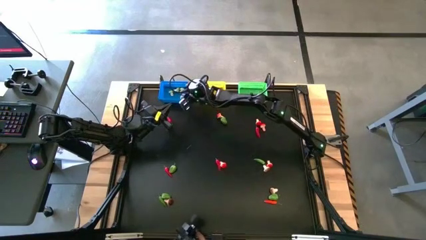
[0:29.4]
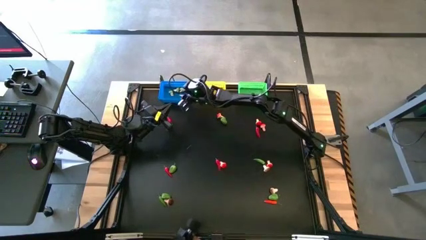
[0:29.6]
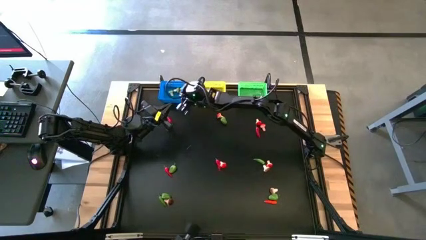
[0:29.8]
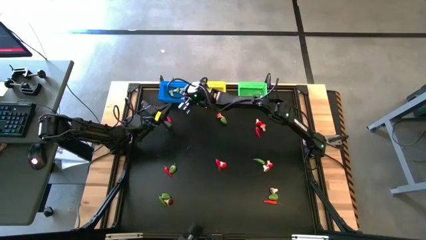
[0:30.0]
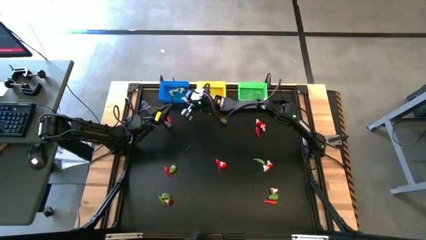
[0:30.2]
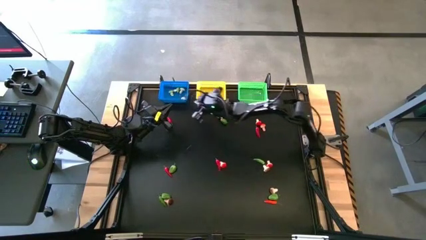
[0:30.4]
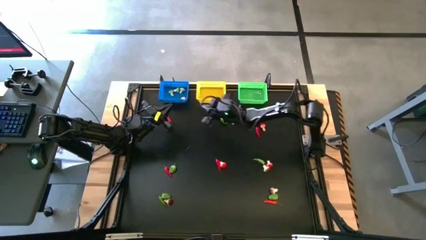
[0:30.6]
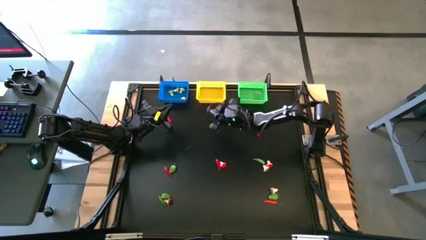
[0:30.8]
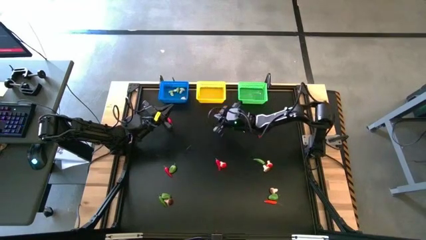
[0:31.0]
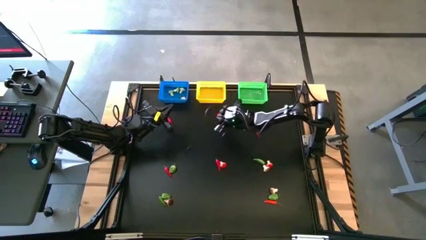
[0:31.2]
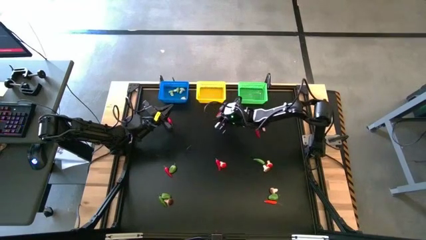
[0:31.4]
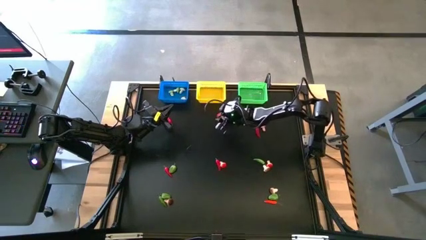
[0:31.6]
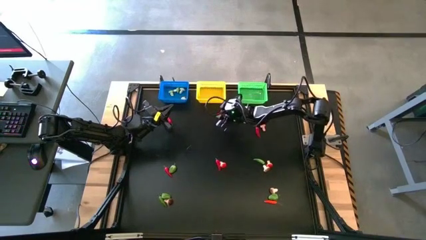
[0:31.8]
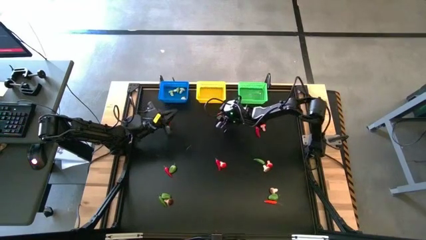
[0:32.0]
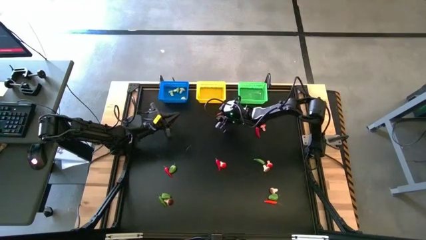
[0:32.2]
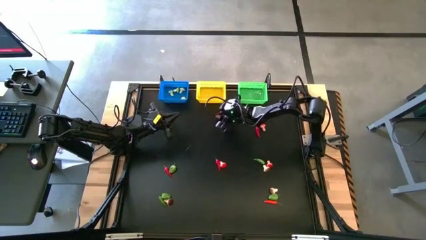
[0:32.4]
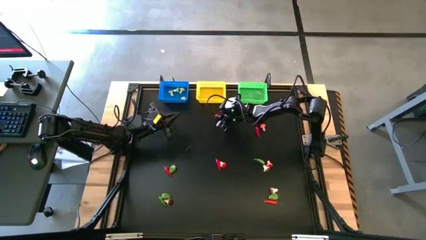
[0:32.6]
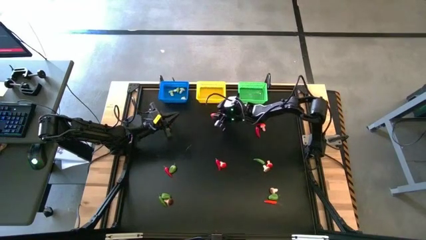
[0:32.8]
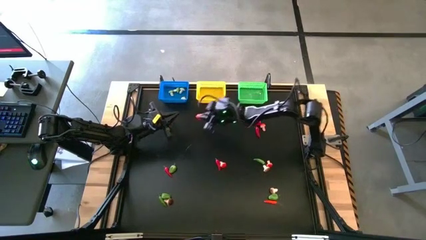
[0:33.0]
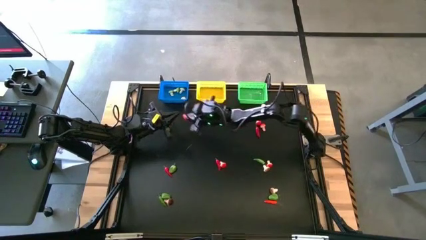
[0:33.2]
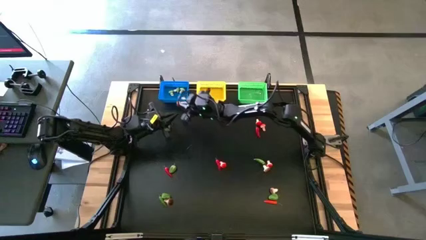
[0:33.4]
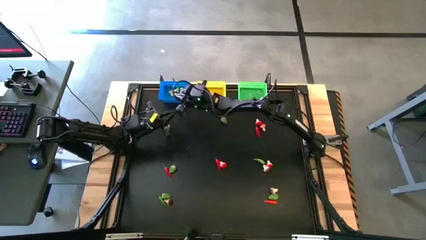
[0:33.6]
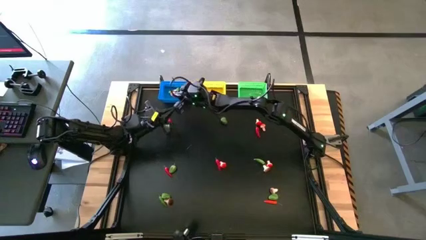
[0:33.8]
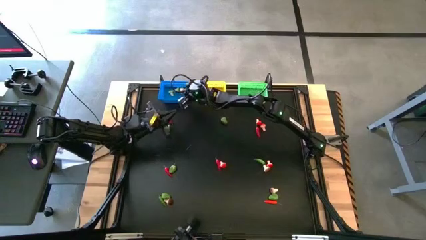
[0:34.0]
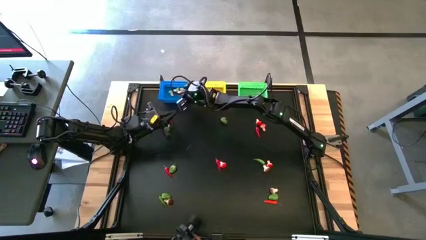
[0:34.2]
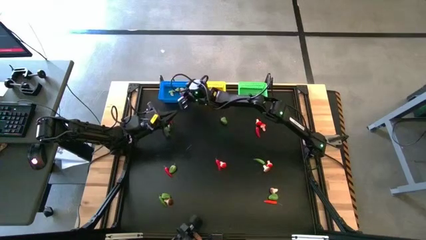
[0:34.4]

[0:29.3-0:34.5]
Task: Sort produce into baskets
Put the red mushroom into the blue bin

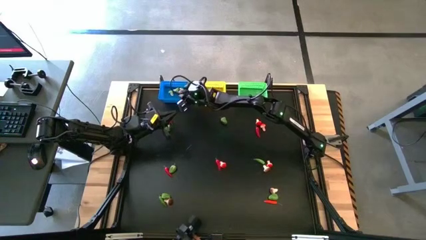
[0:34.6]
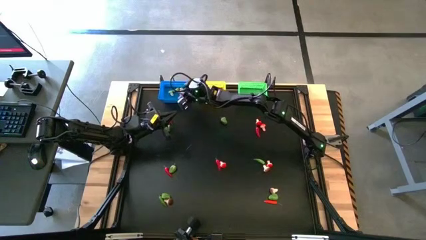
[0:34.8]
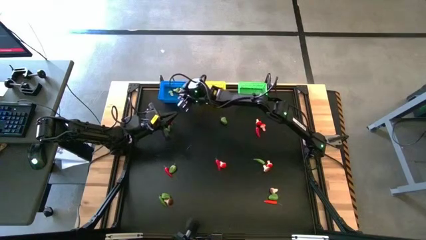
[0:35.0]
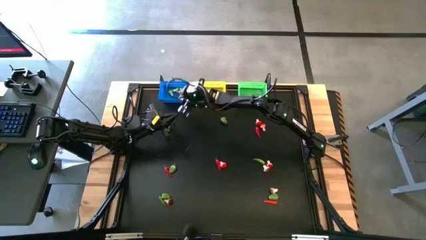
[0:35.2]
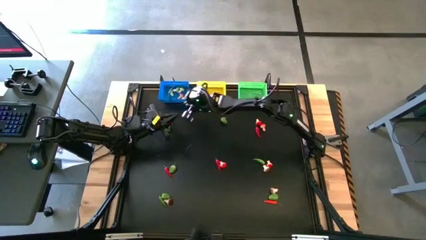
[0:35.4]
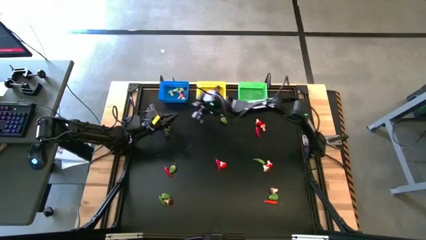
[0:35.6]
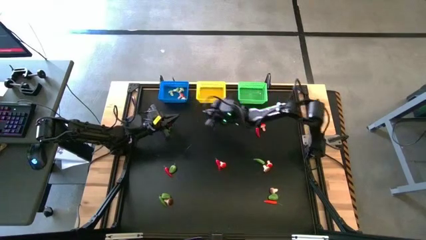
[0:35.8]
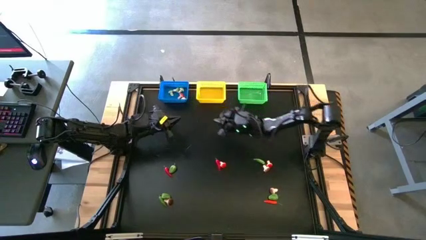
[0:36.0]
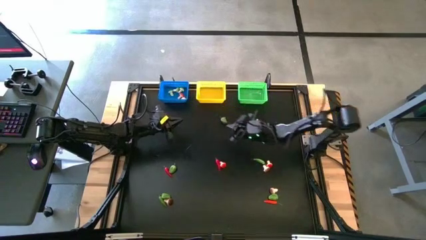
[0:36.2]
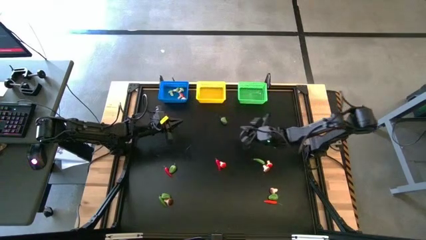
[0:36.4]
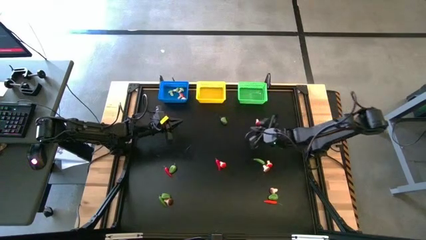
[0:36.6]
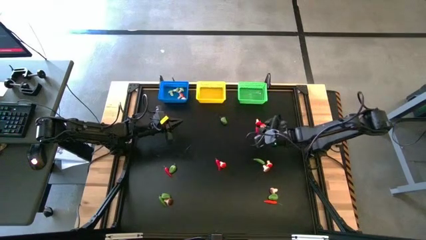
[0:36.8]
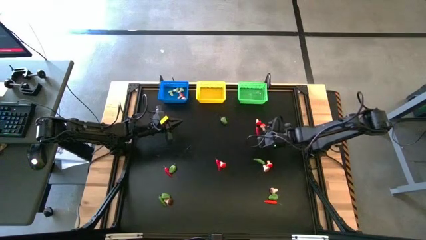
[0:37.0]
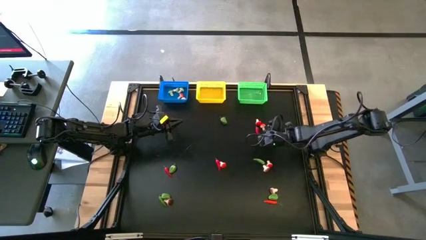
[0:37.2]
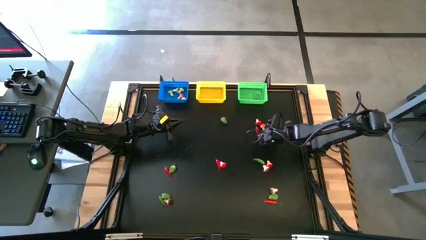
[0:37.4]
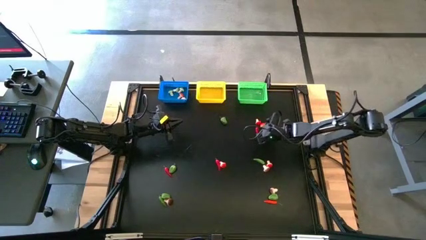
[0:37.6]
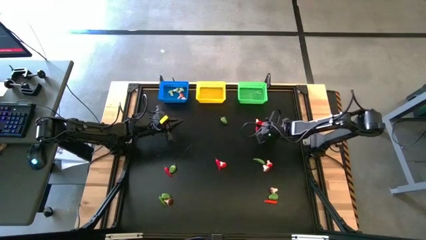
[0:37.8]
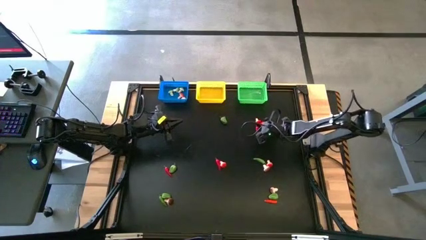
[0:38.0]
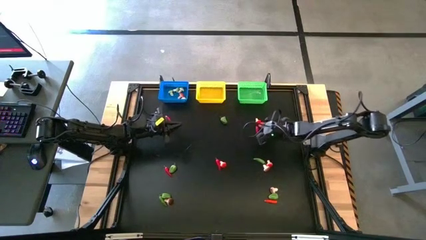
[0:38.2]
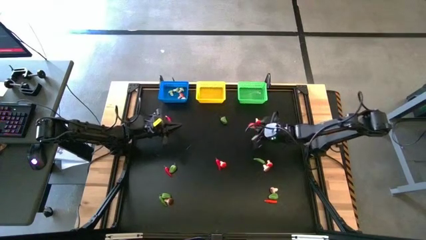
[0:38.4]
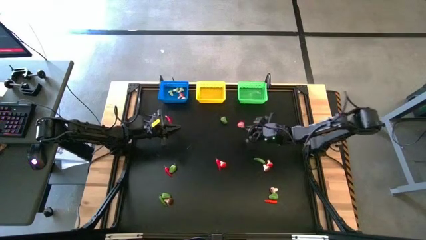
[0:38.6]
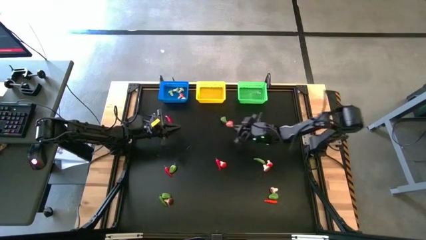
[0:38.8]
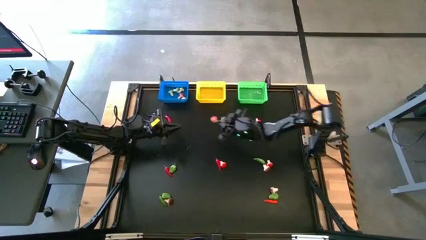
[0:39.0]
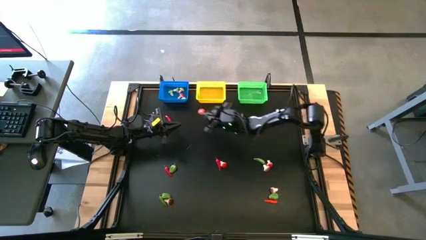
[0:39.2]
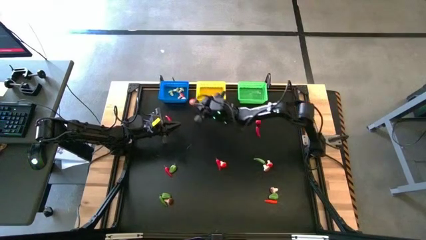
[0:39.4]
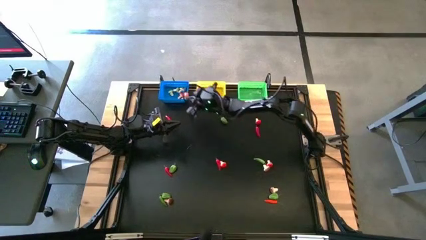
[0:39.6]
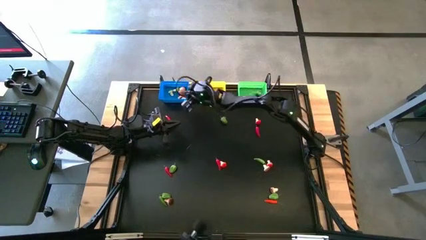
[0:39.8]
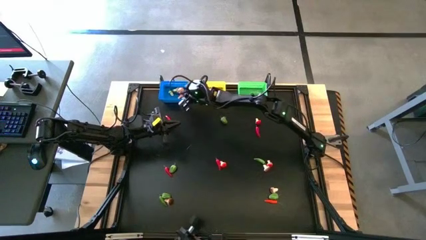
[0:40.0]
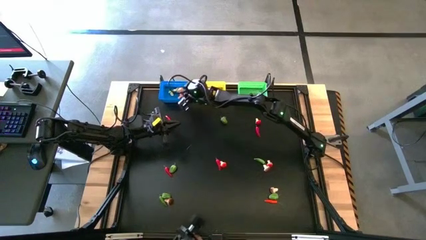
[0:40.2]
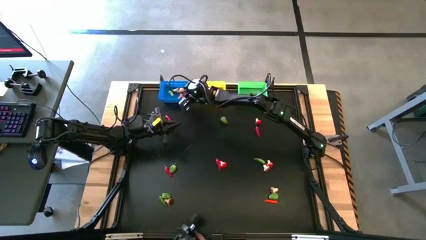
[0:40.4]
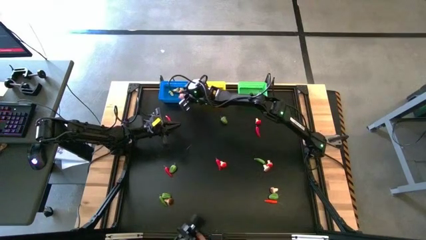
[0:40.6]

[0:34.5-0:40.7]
Put the red mushroom into the blue bin

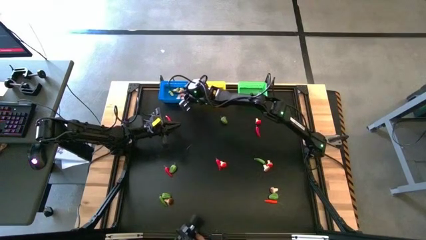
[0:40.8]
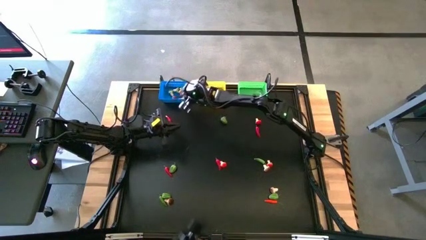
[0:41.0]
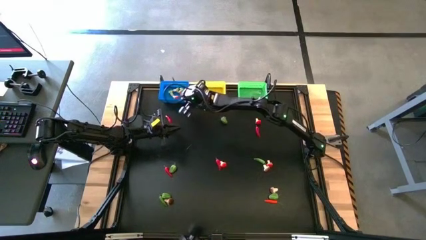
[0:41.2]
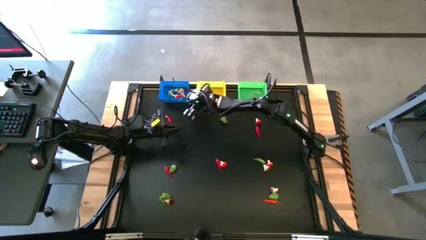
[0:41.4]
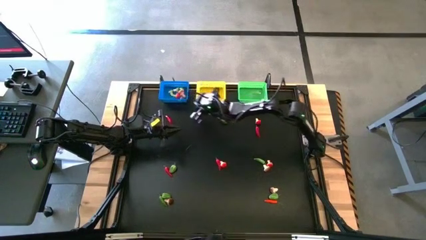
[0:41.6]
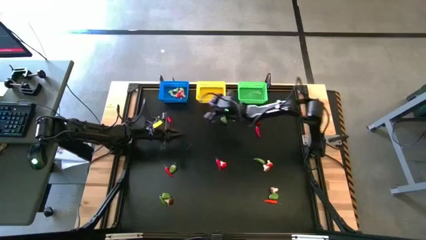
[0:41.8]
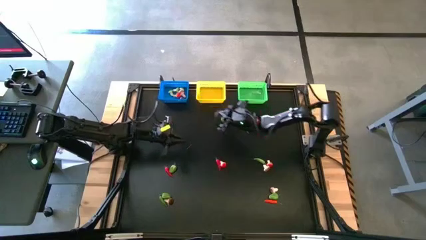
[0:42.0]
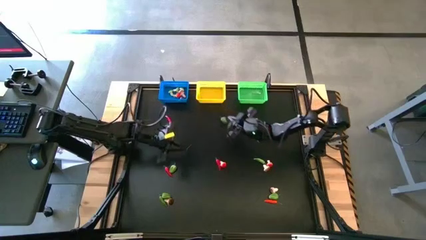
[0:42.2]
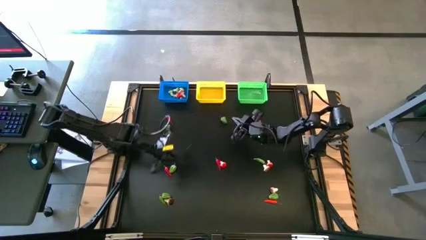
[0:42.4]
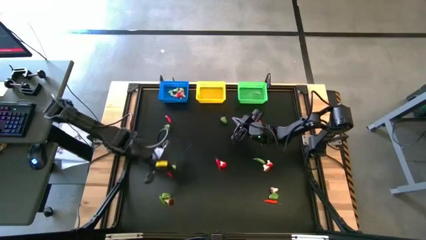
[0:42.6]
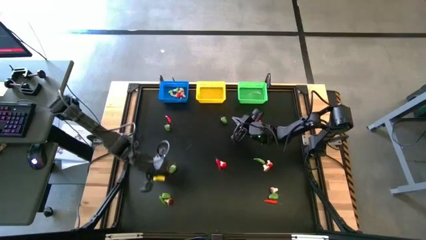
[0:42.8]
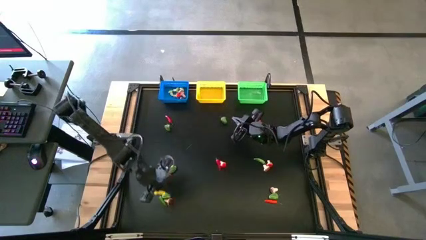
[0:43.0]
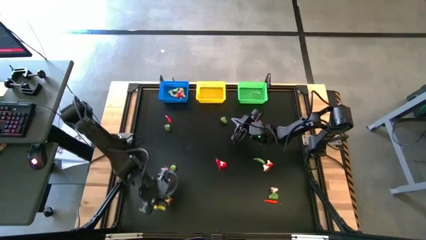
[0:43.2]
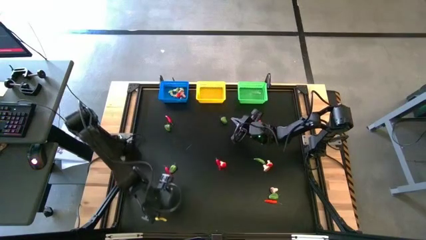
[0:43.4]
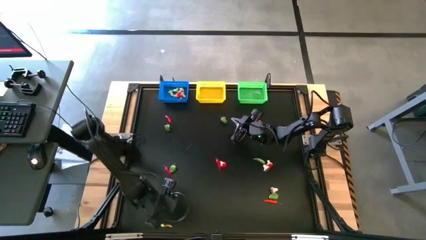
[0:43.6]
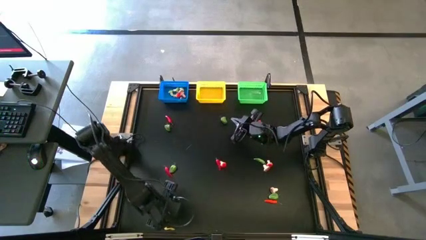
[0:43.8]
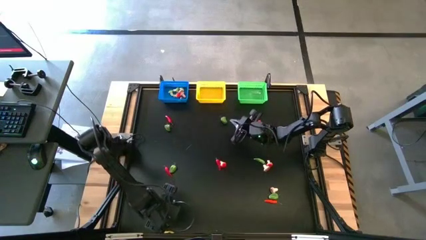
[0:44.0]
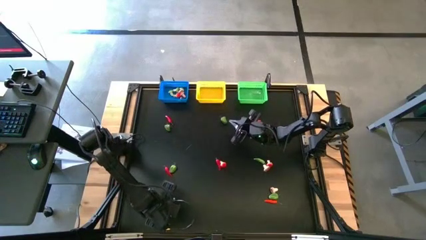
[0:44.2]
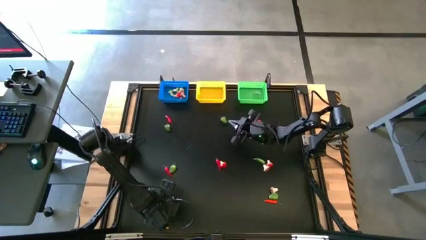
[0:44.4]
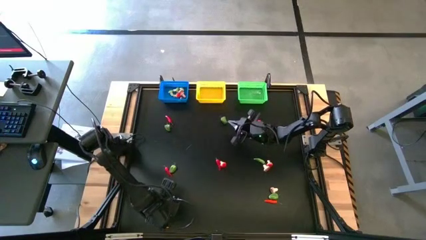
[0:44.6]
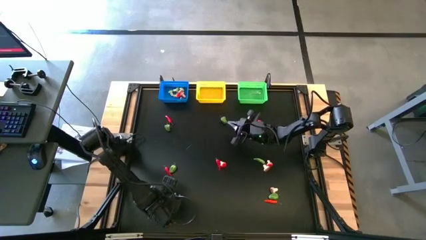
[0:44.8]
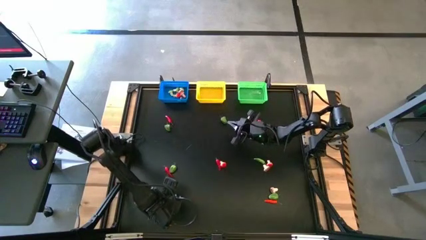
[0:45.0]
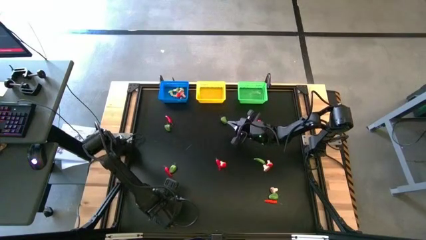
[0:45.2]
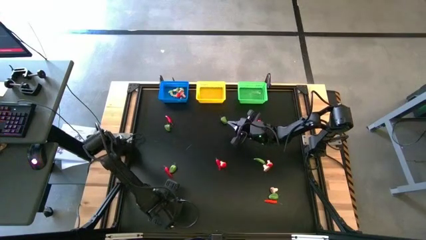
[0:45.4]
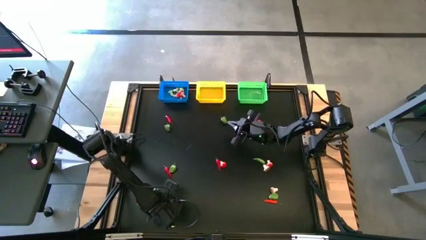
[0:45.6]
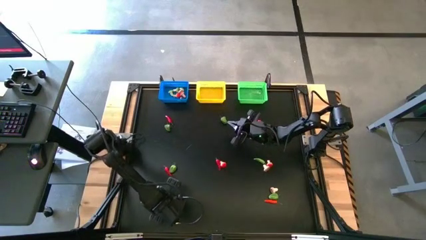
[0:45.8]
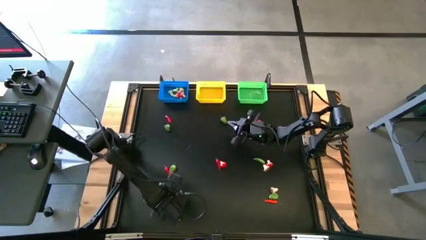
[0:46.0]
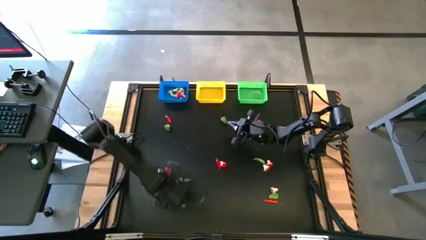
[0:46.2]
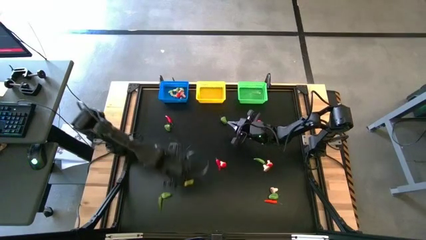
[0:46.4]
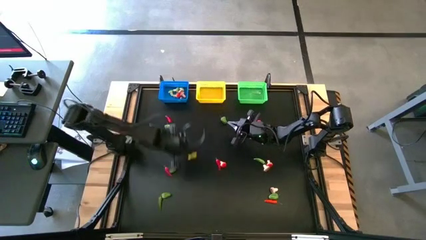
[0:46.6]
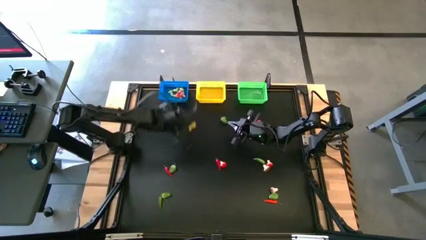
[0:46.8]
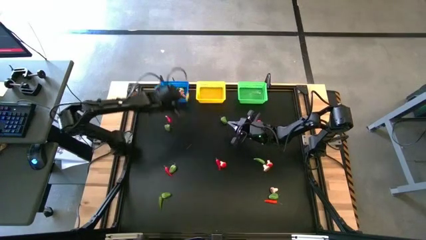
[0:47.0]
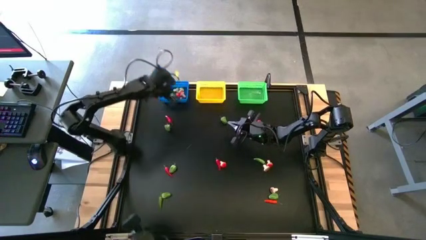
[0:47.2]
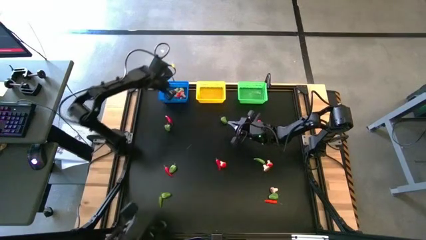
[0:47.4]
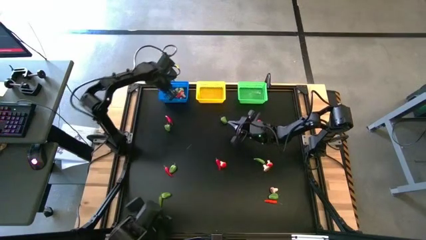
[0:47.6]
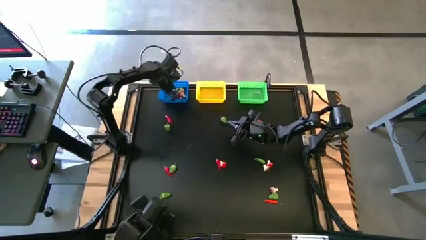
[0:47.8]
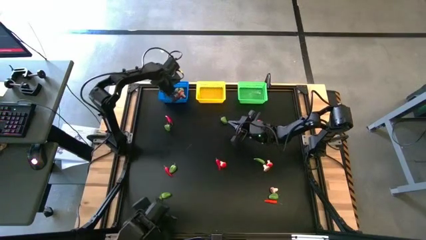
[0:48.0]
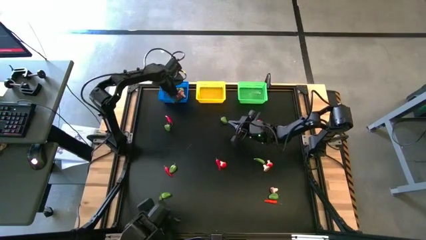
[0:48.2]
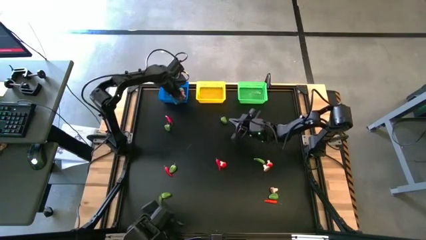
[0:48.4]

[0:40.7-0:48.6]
Put the brown mushroom into the blue bin
